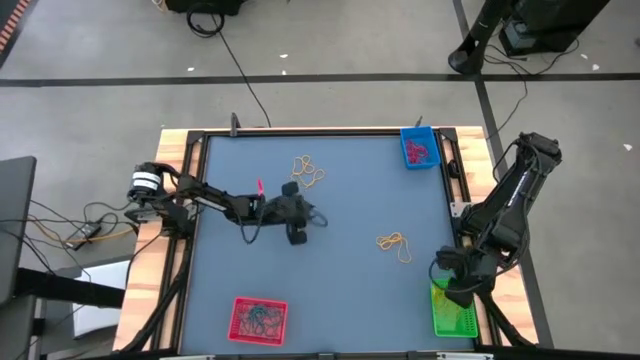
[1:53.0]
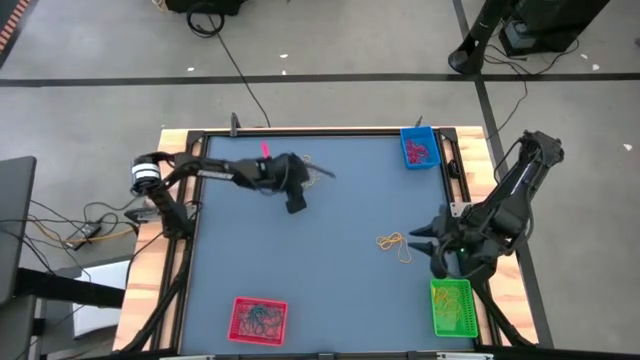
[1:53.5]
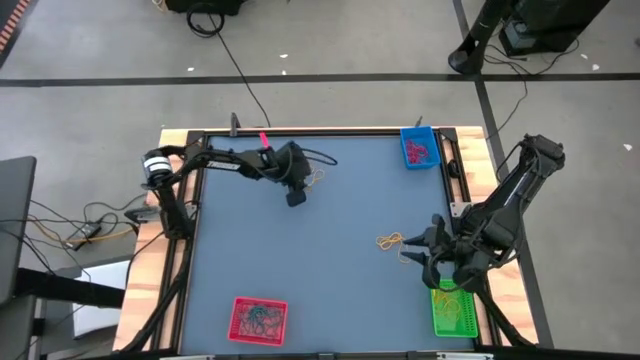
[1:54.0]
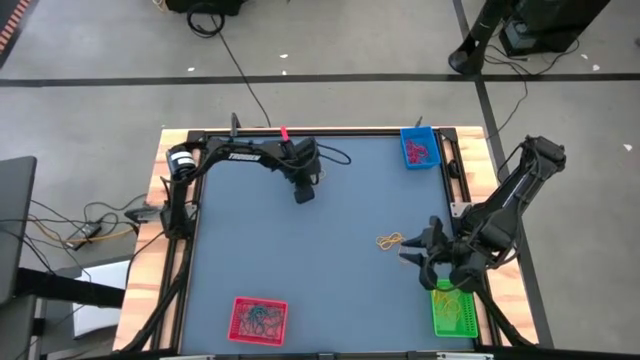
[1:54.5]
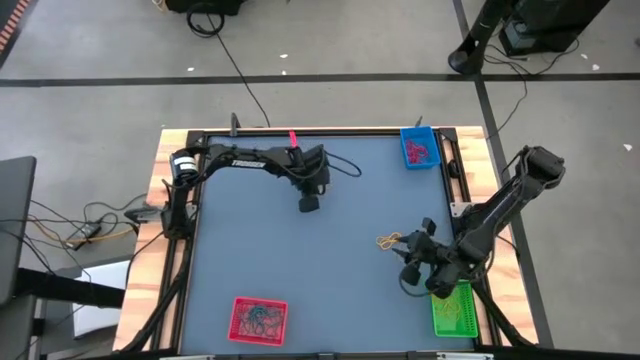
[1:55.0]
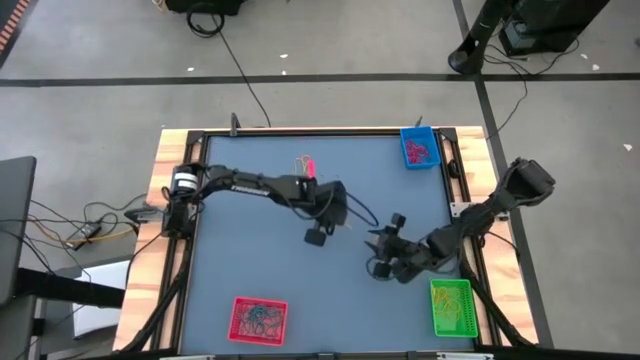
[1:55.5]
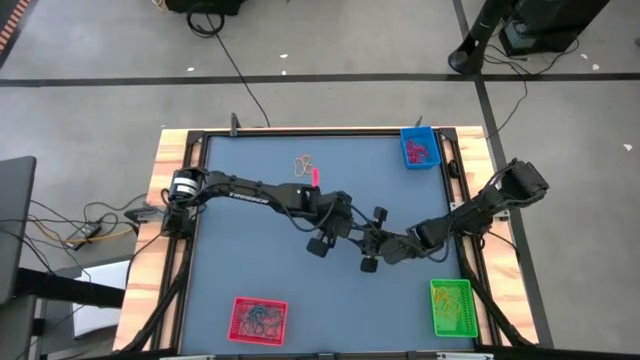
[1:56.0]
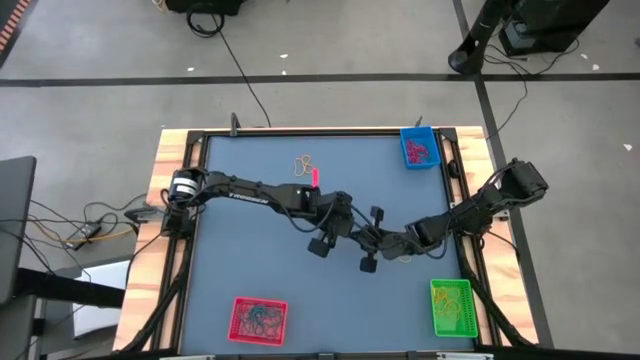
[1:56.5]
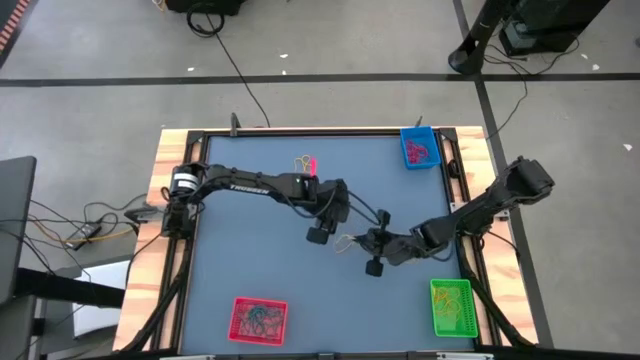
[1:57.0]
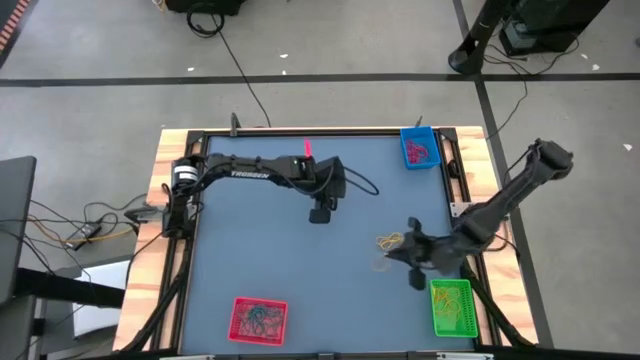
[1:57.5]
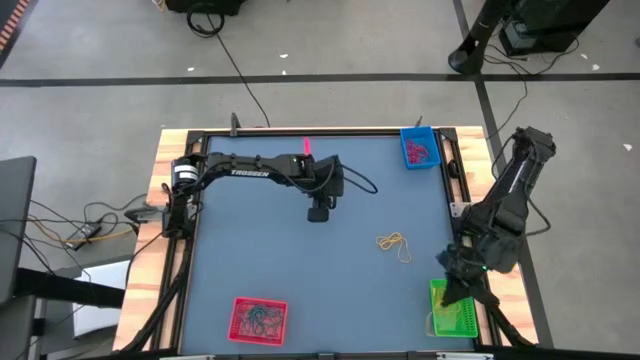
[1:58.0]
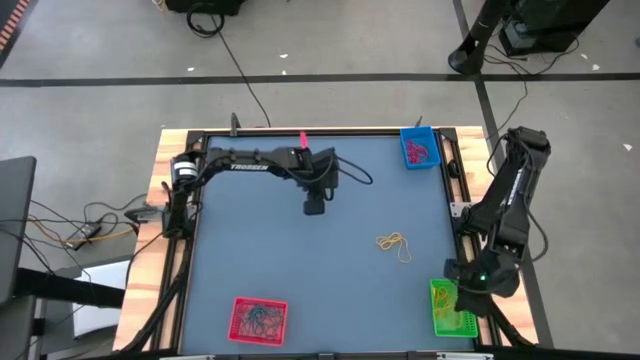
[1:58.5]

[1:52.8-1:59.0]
Task: Sort rubber bands into baskets
Put the yellow rubber band into the green bin

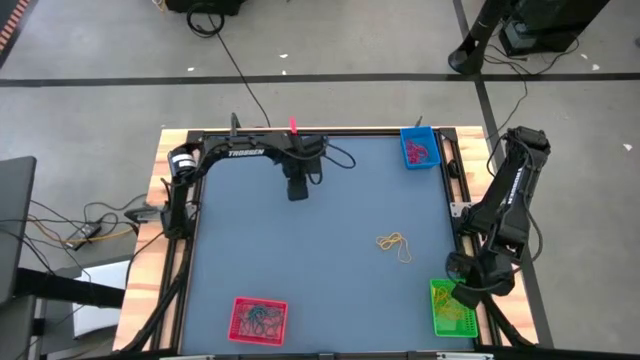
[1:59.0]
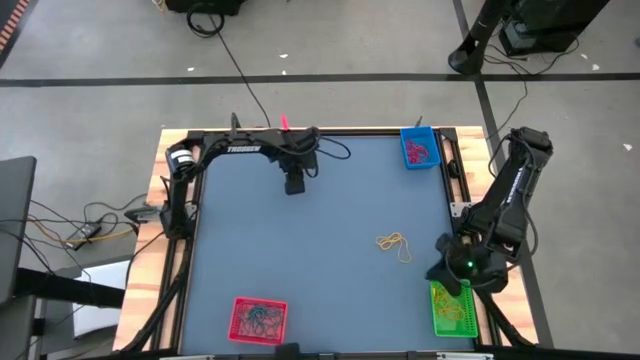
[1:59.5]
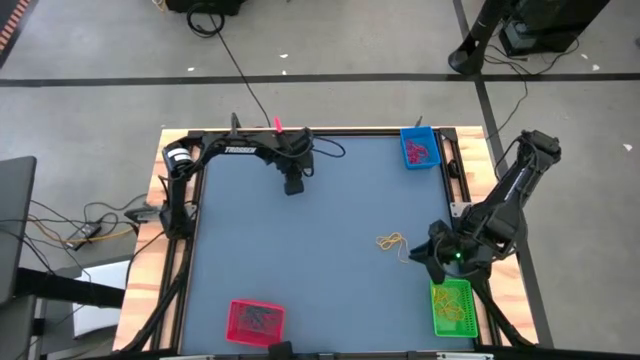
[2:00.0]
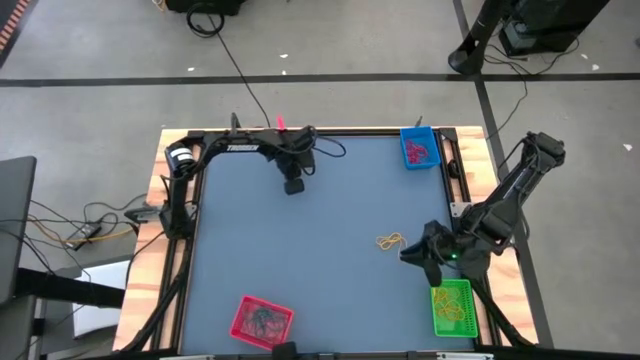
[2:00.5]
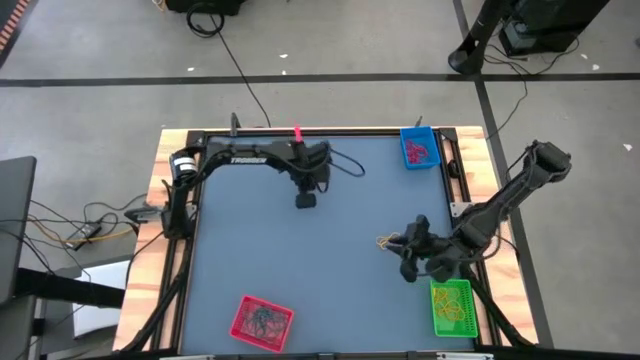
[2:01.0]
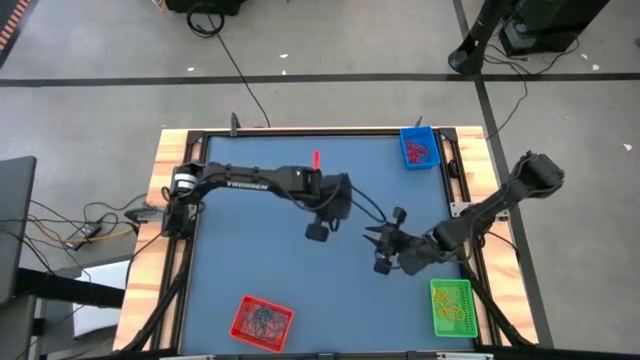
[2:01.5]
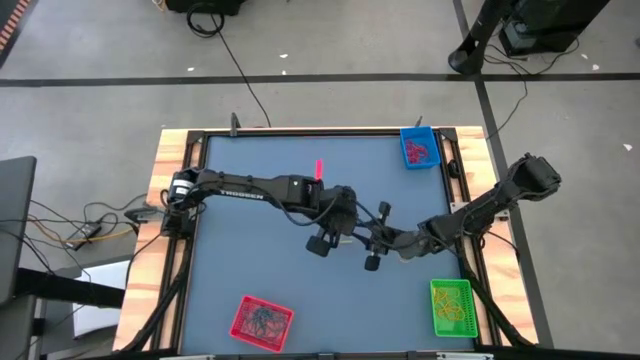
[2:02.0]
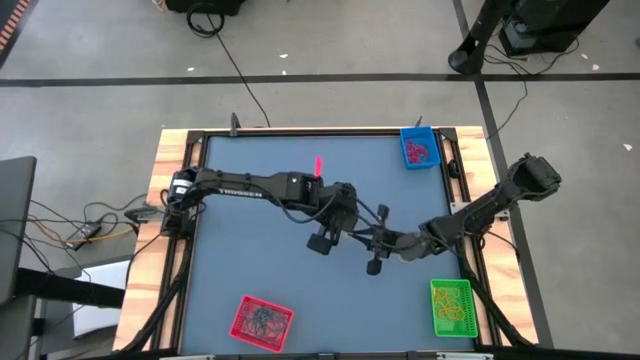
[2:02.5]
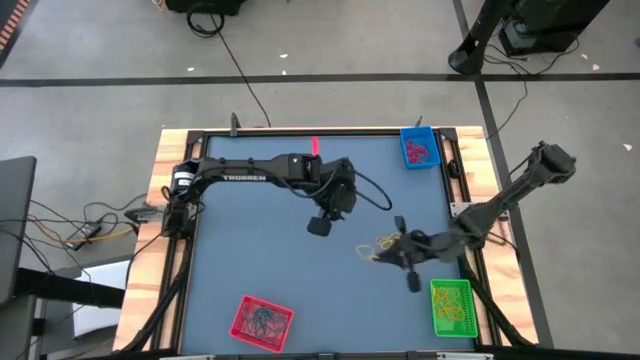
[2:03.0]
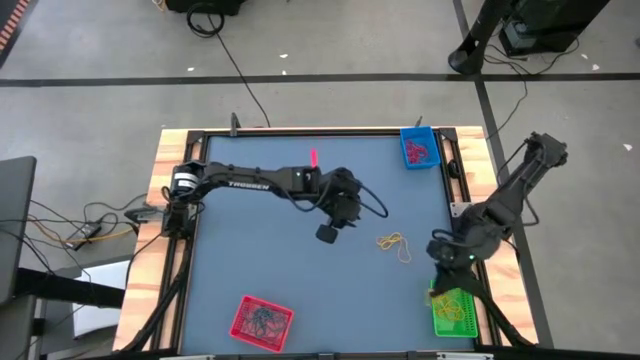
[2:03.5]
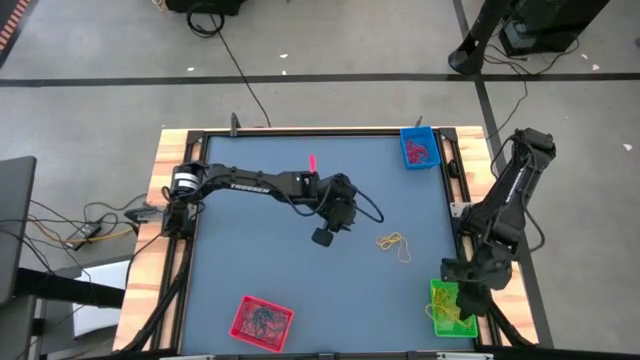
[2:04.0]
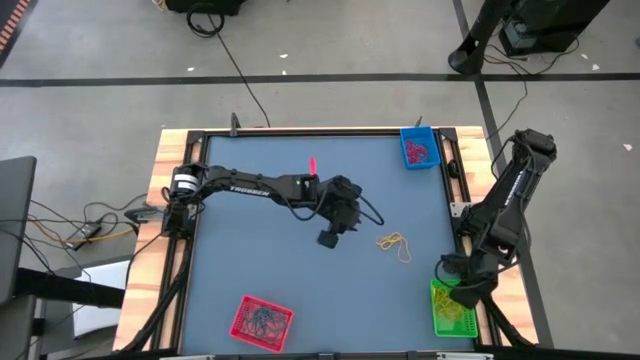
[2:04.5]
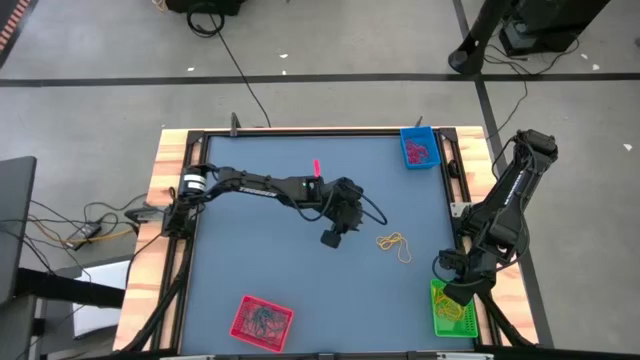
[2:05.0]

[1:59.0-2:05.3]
Put the yellow rubber band into the green bin

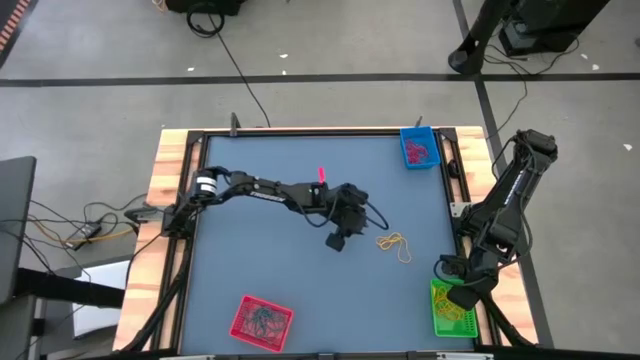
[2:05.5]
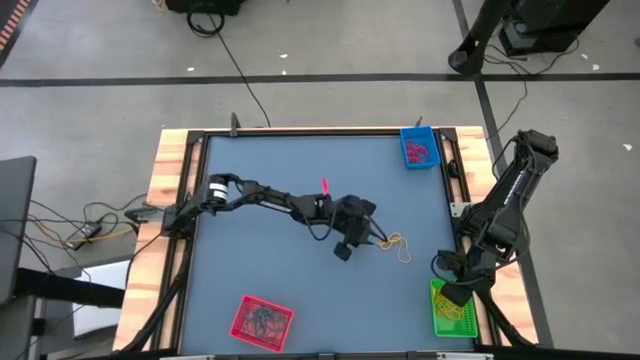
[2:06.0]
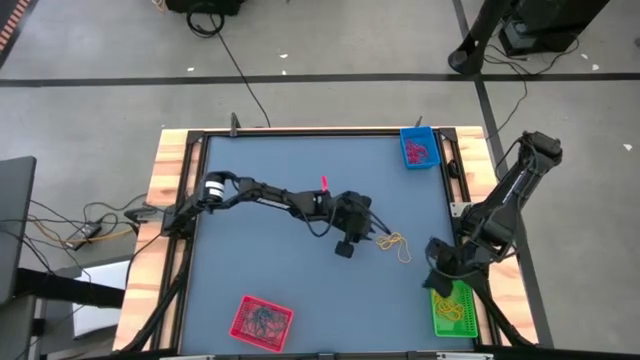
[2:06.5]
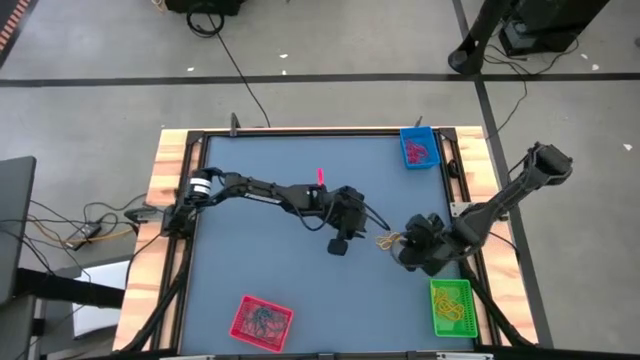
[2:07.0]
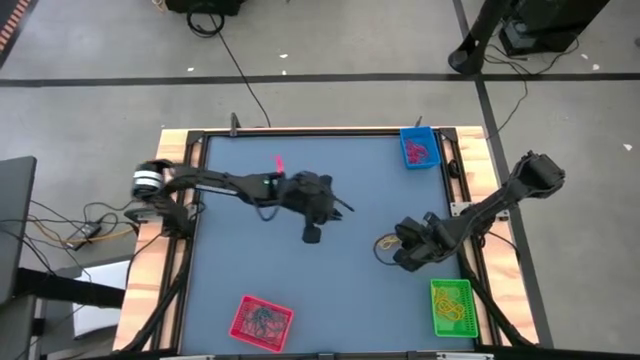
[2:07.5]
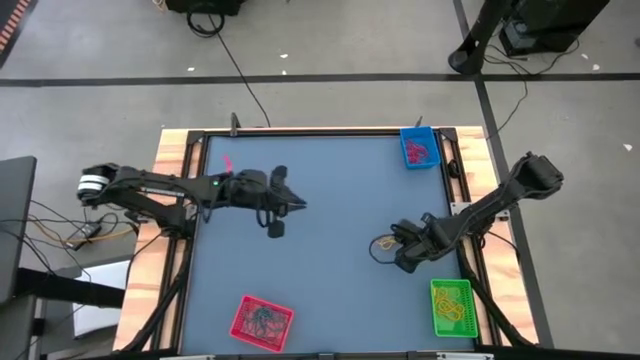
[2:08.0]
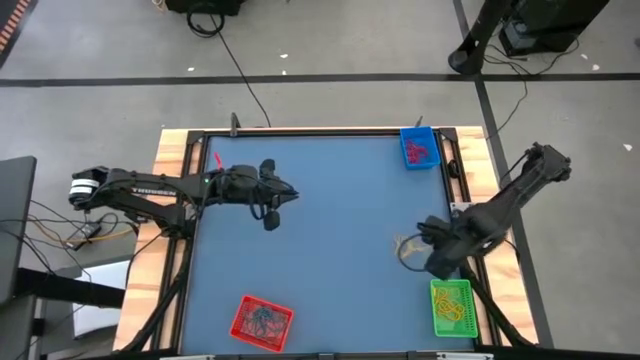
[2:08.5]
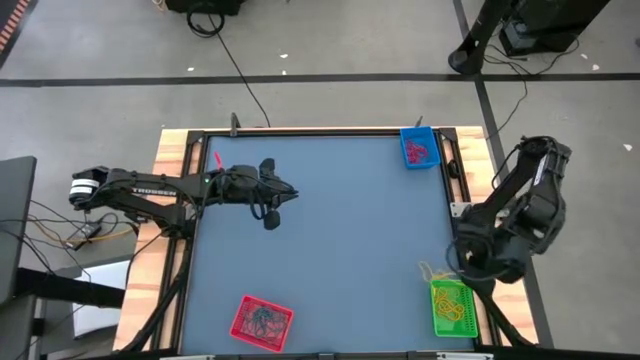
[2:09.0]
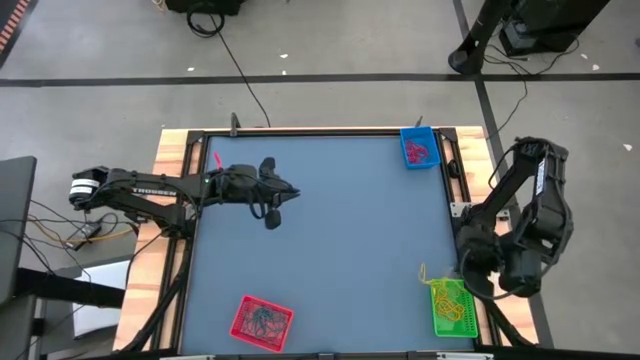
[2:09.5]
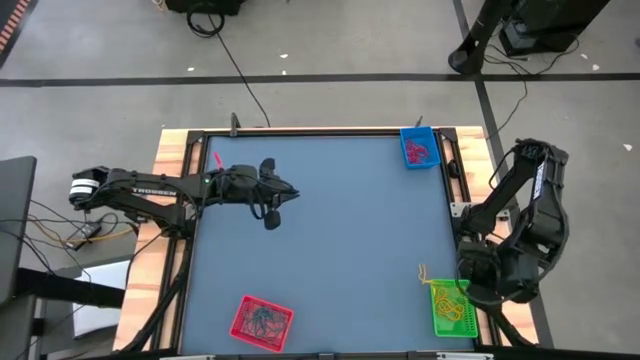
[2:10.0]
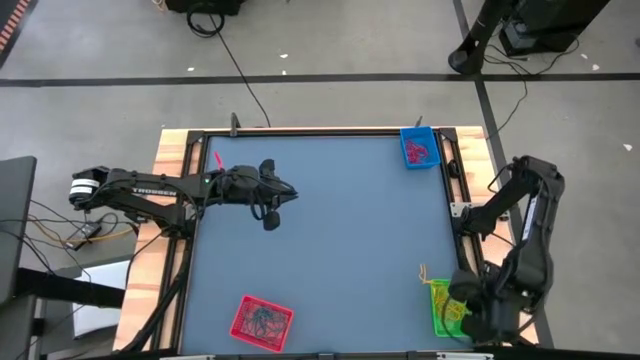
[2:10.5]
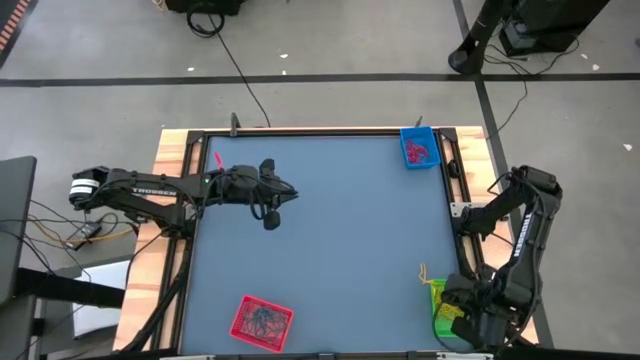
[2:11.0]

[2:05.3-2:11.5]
Put the yellow rubber band into the green bin

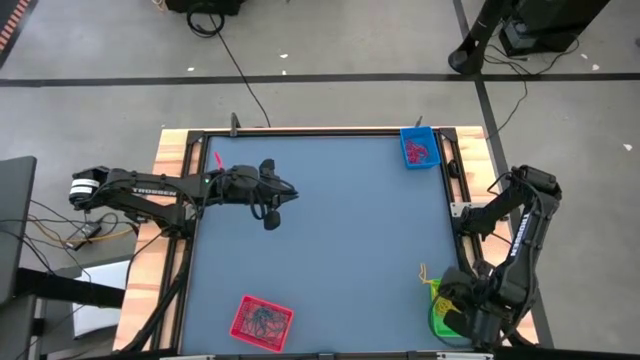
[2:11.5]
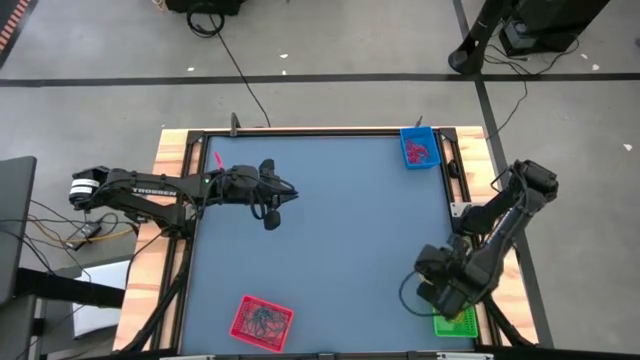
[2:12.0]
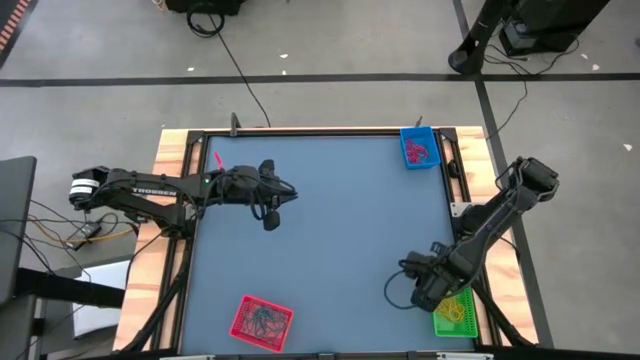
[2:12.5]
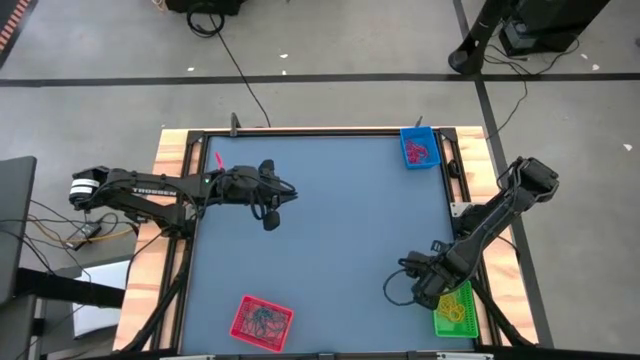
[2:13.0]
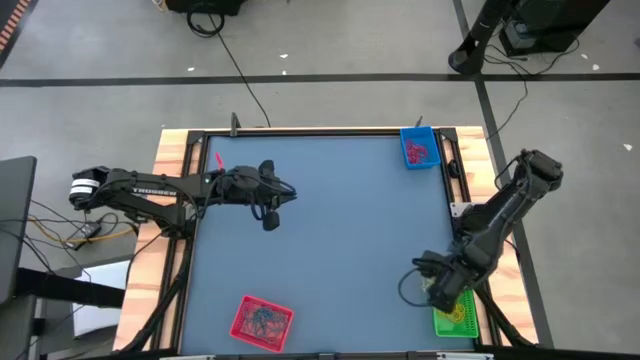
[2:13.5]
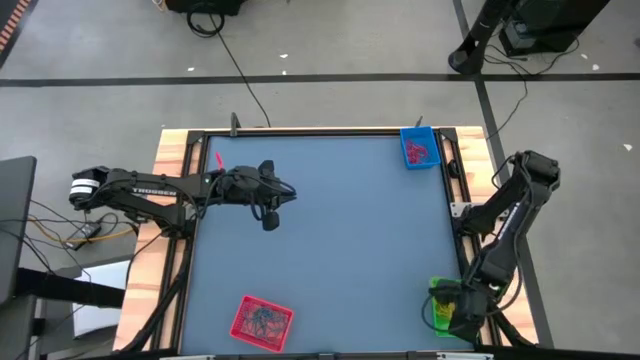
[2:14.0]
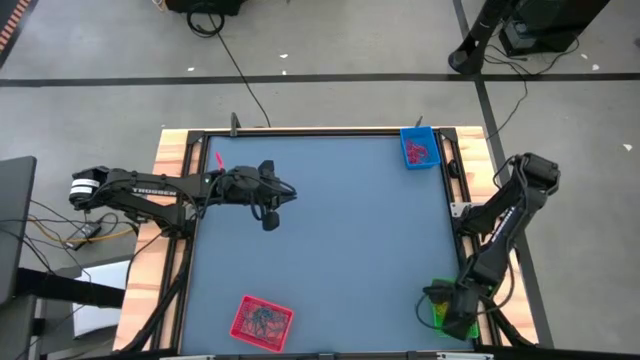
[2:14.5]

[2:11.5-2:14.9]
Put the yellow rubberband into the green bin
